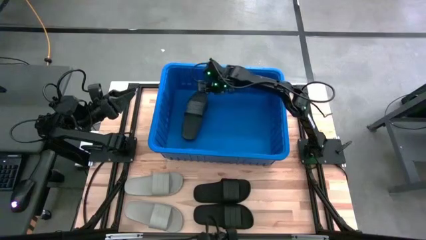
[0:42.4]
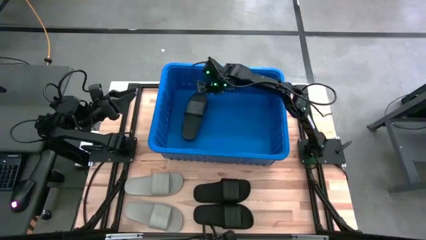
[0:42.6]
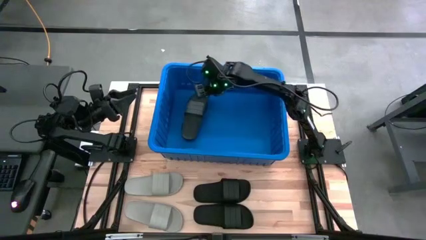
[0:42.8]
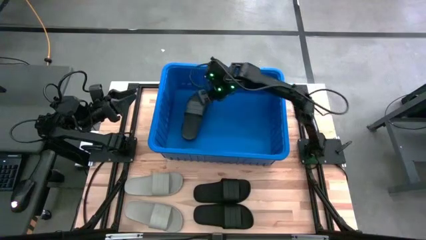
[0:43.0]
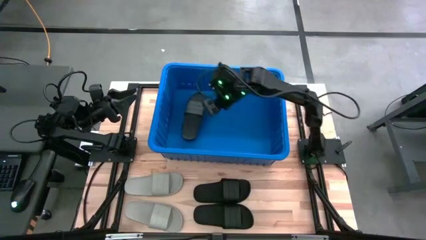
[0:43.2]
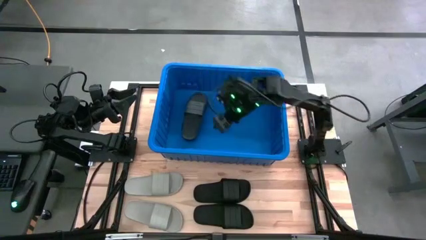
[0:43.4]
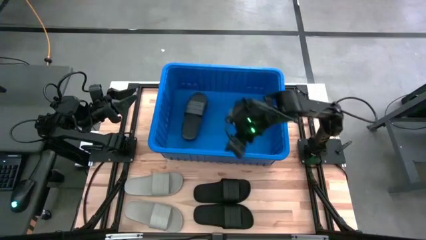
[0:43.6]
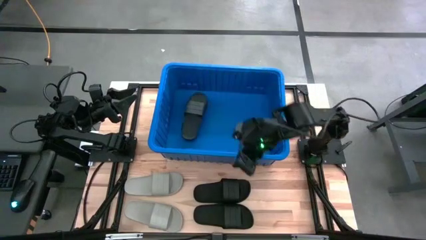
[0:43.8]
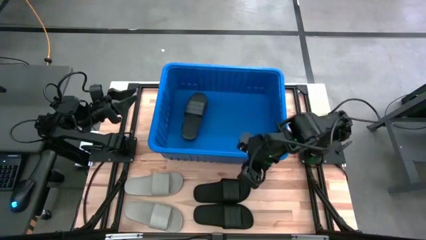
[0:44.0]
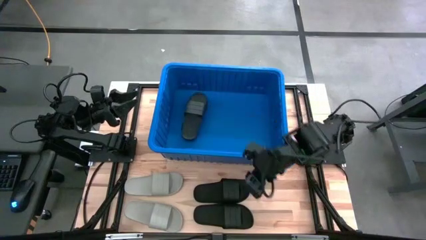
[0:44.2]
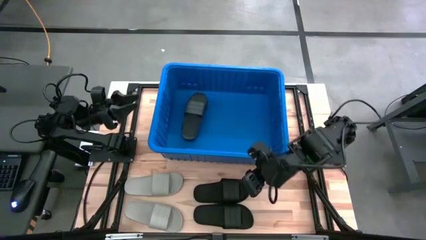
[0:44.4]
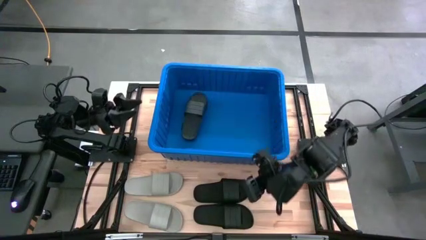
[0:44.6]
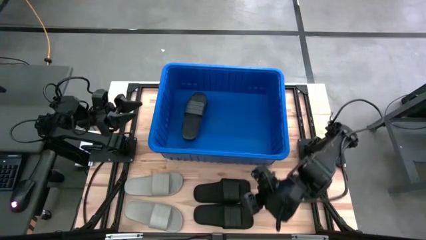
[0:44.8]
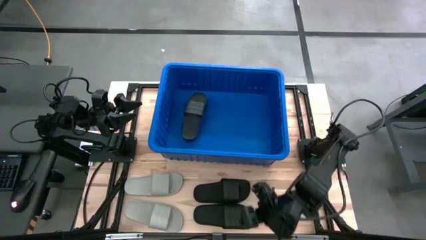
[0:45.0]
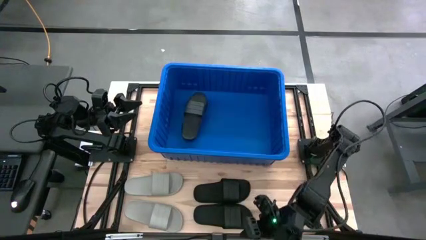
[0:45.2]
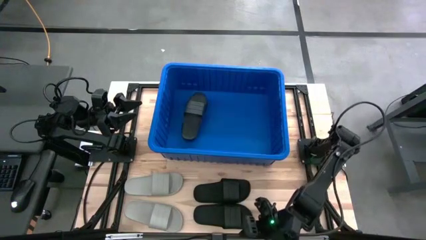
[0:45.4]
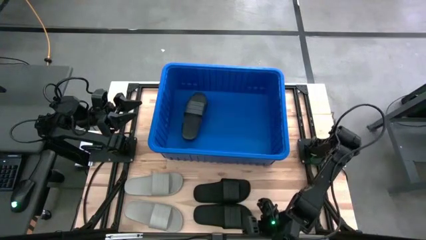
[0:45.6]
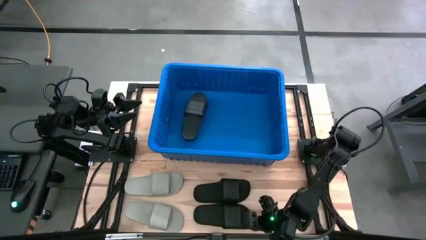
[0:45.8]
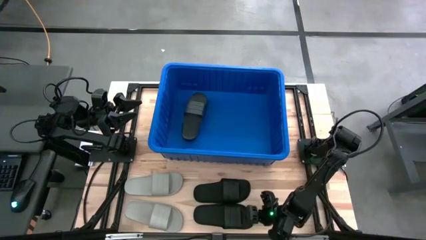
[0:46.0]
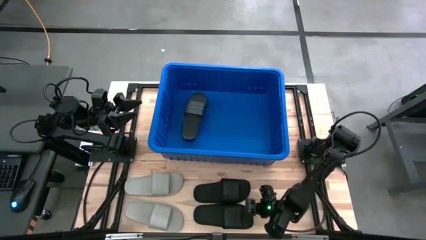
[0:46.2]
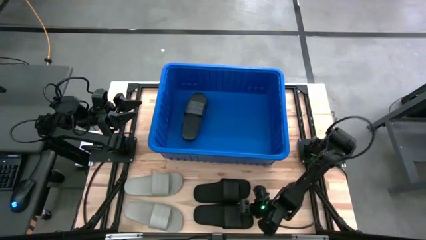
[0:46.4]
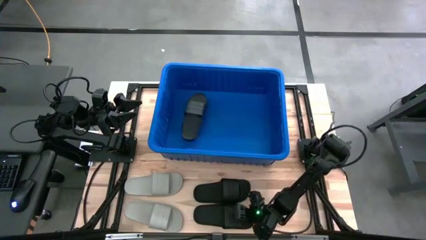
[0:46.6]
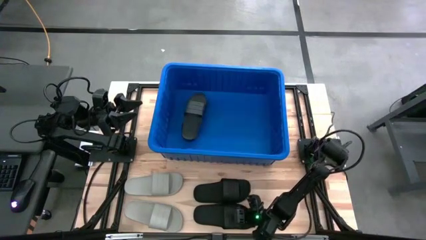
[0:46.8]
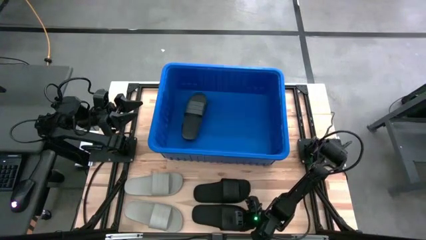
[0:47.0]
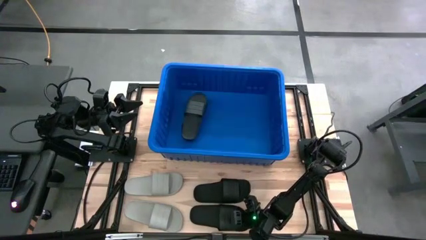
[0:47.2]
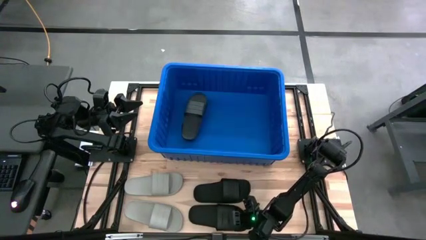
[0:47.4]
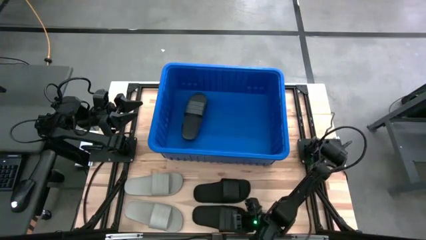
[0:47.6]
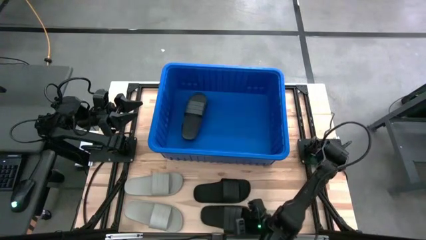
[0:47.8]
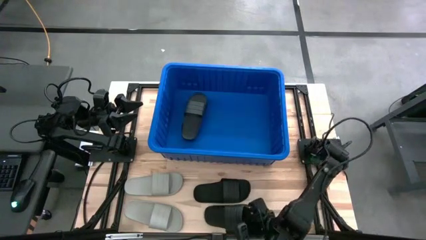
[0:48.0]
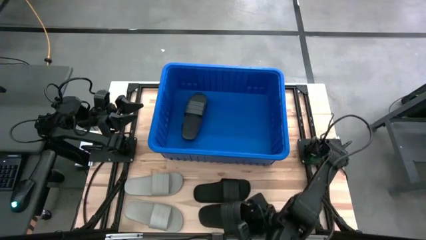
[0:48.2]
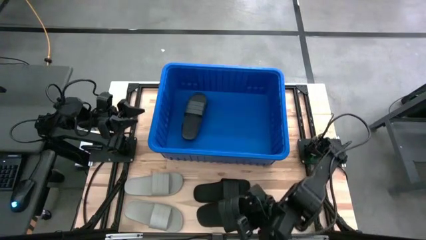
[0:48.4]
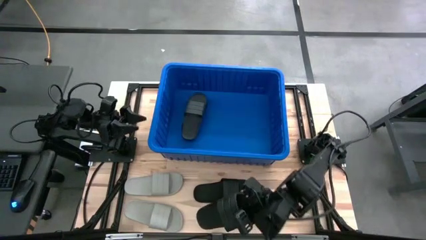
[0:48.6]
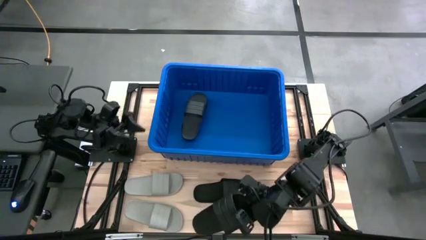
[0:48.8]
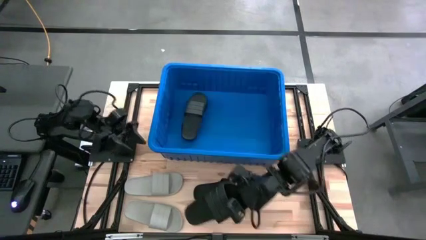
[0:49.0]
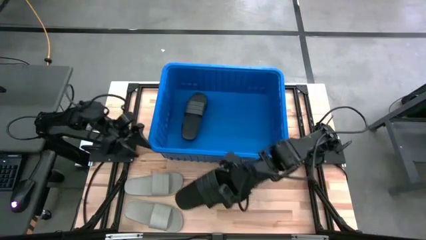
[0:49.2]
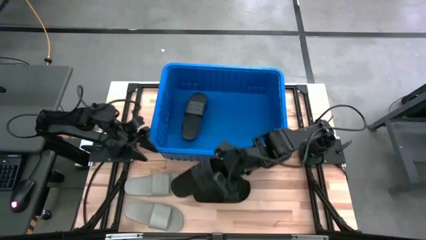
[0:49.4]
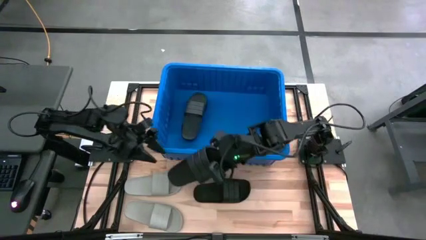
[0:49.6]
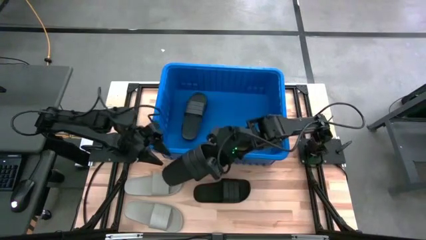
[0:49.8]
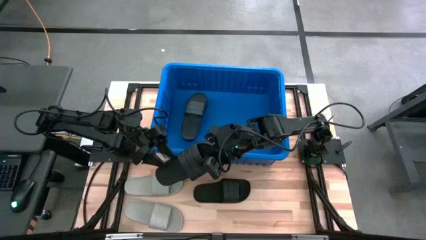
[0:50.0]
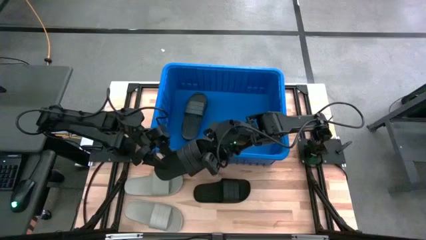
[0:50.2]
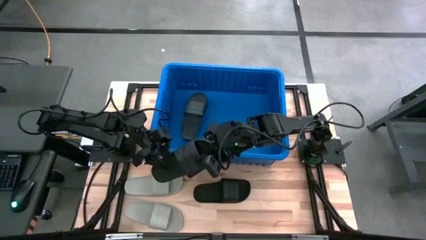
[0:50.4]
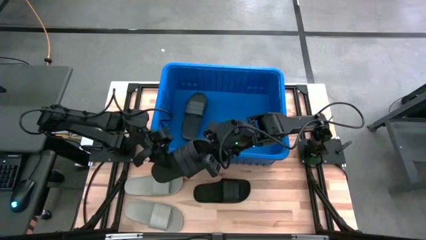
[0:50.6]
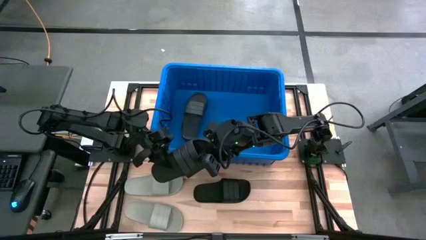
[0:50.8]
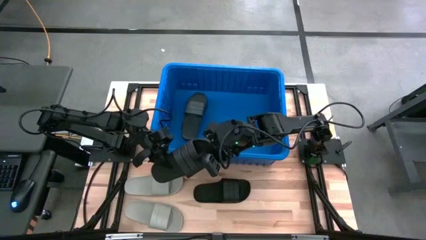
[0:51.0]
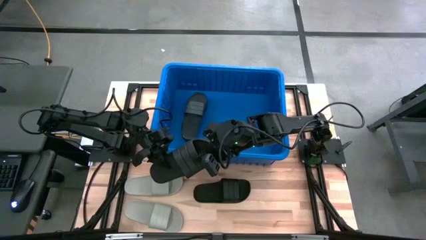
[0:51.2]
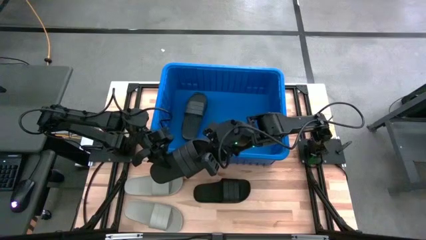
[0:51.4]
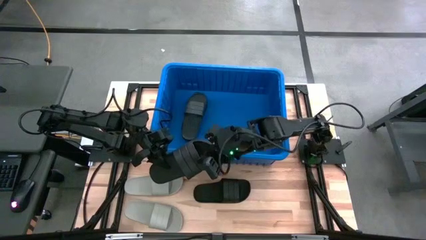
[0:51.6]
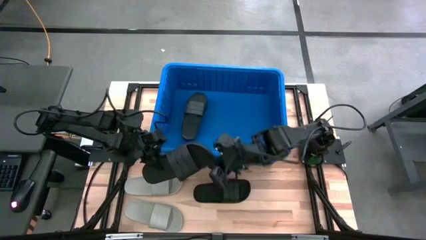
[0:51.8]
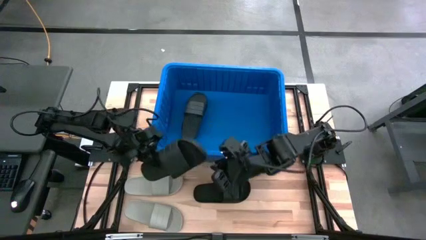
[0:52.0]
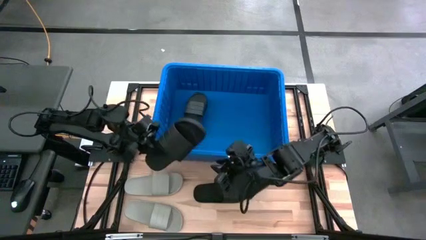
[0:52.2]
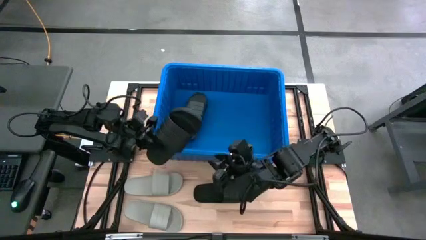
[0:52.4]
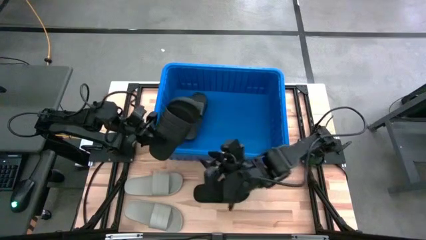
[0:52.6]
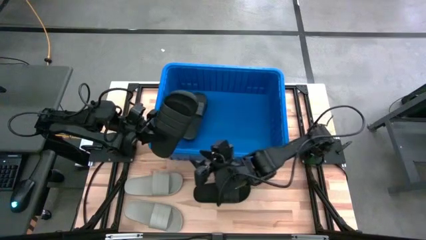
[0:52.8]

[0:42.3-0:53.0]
Task: Pick and place slides into bin
Put the bottom black slide into the blue bin
